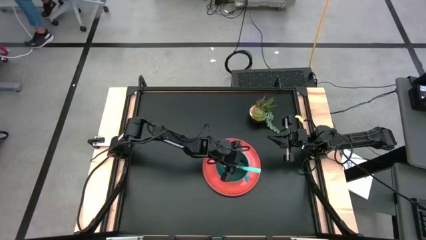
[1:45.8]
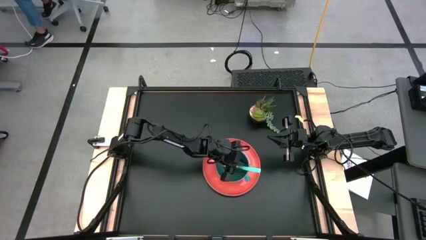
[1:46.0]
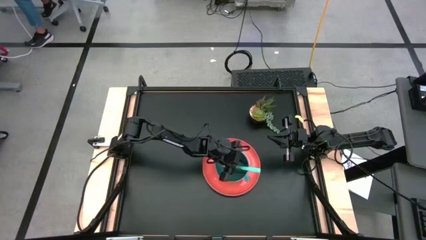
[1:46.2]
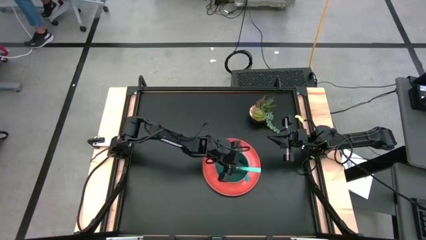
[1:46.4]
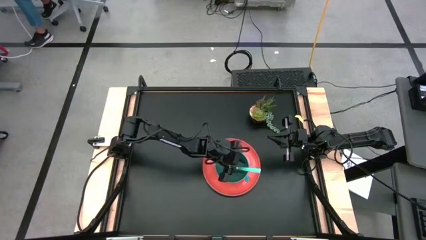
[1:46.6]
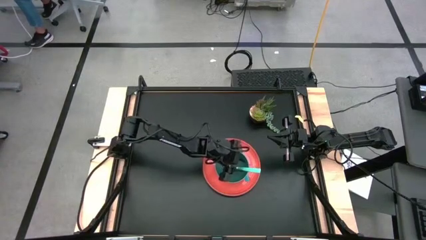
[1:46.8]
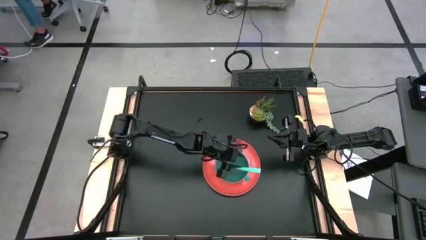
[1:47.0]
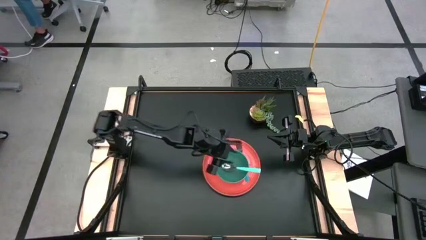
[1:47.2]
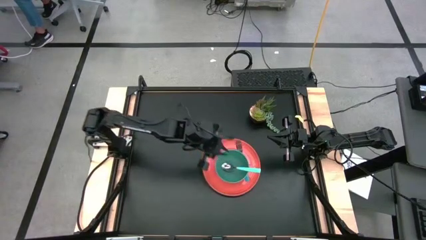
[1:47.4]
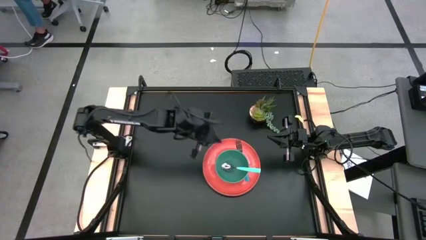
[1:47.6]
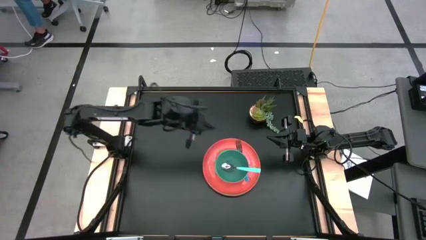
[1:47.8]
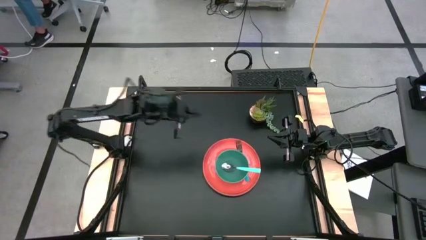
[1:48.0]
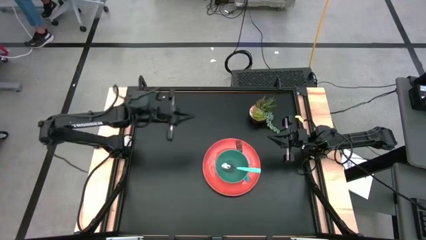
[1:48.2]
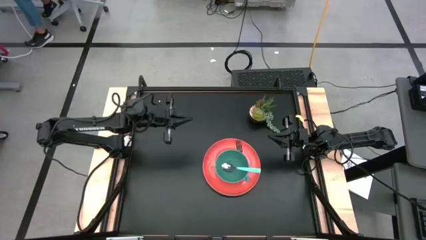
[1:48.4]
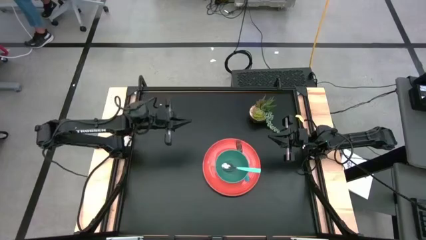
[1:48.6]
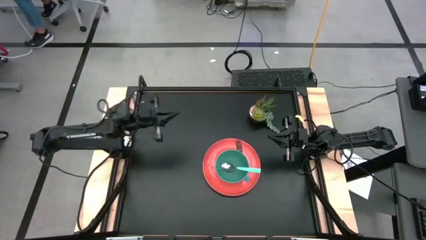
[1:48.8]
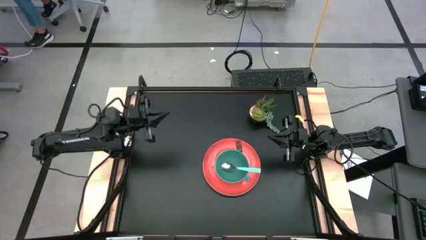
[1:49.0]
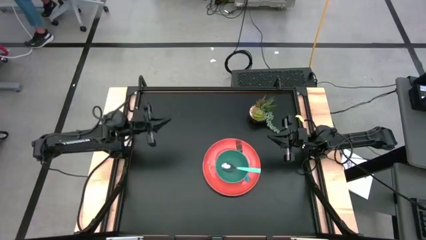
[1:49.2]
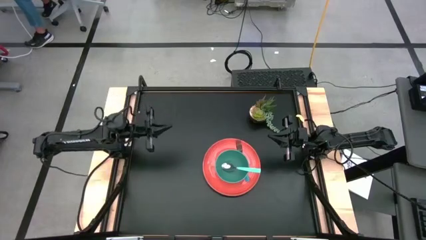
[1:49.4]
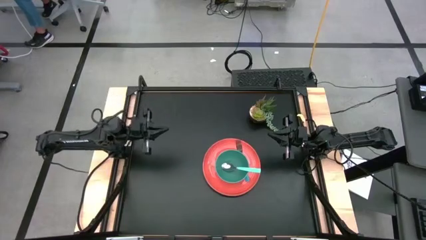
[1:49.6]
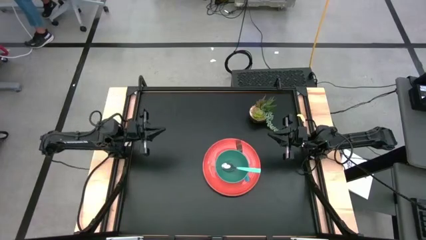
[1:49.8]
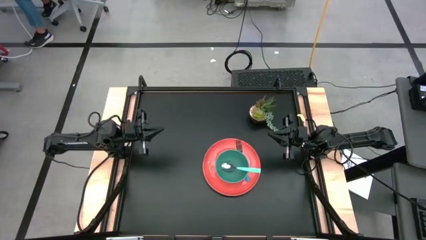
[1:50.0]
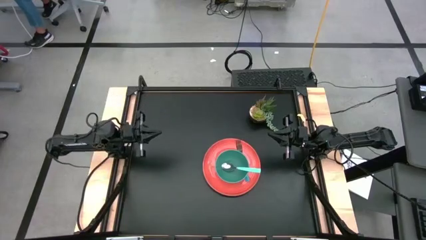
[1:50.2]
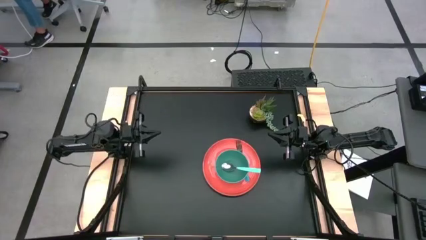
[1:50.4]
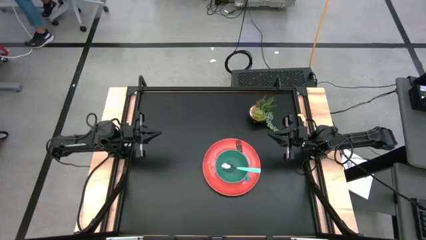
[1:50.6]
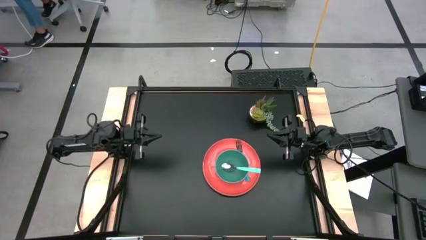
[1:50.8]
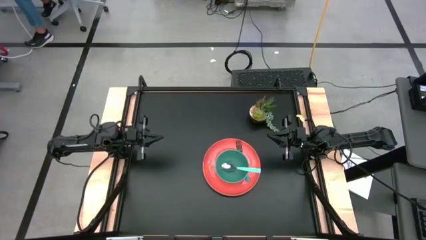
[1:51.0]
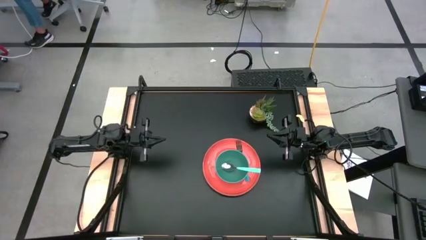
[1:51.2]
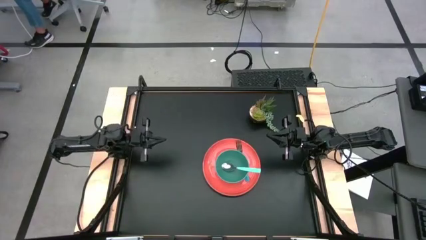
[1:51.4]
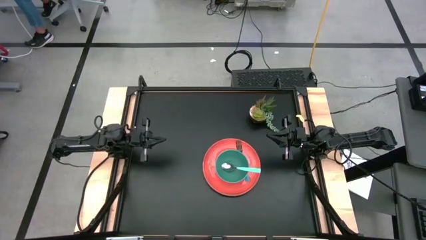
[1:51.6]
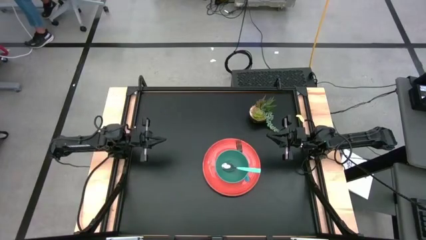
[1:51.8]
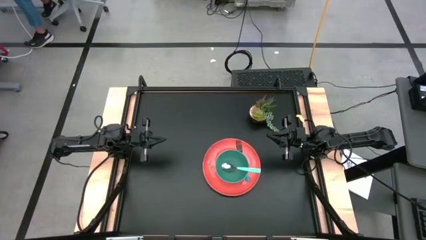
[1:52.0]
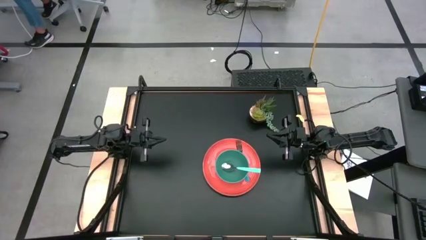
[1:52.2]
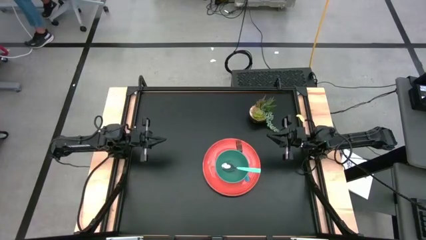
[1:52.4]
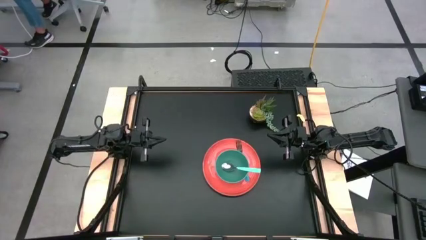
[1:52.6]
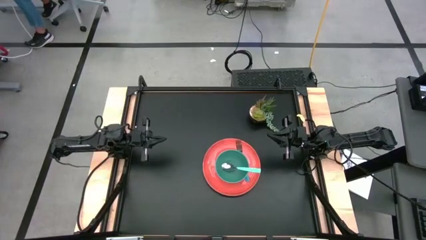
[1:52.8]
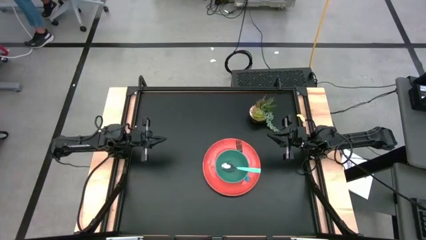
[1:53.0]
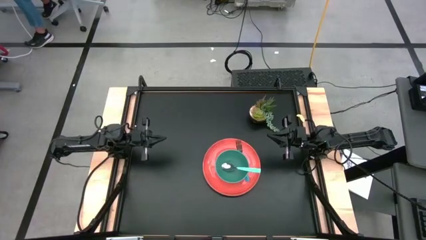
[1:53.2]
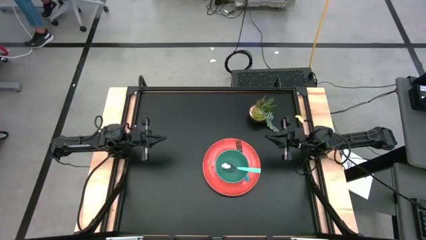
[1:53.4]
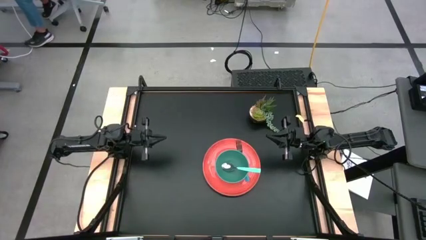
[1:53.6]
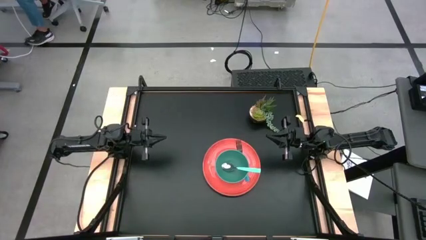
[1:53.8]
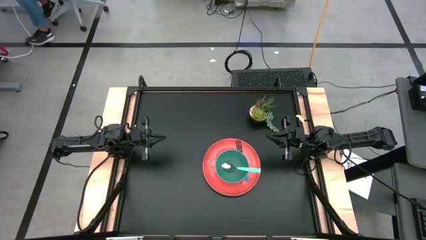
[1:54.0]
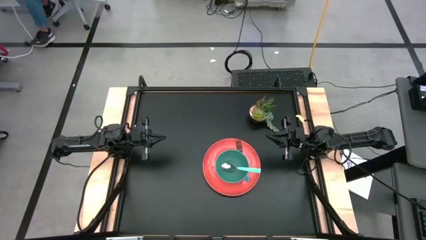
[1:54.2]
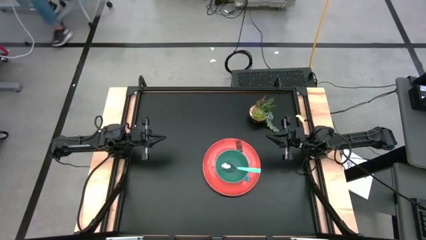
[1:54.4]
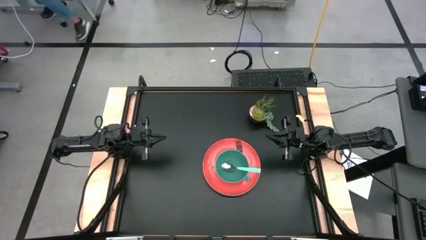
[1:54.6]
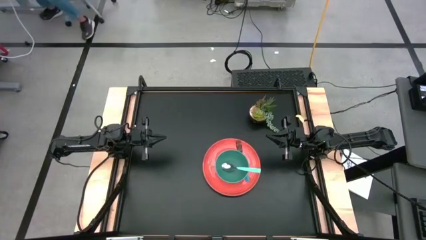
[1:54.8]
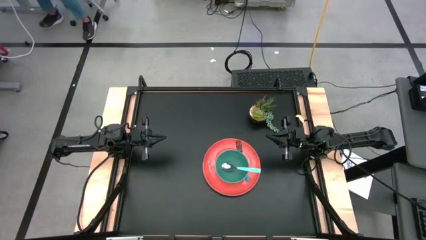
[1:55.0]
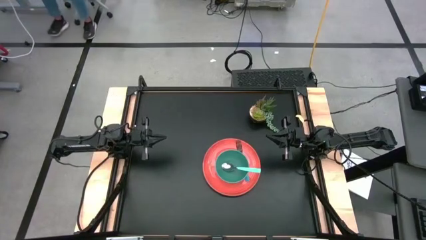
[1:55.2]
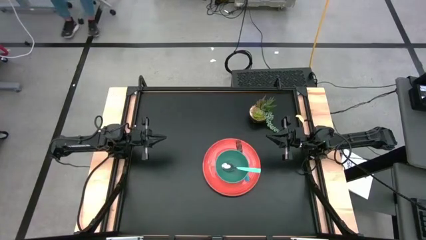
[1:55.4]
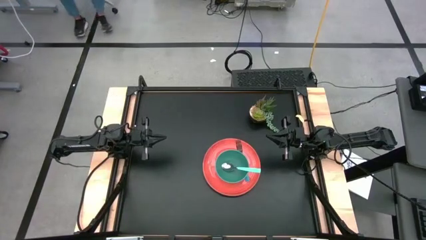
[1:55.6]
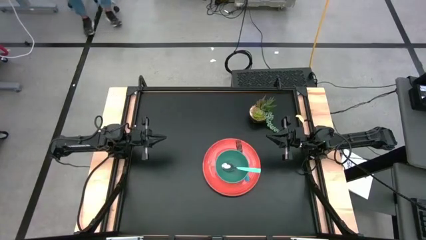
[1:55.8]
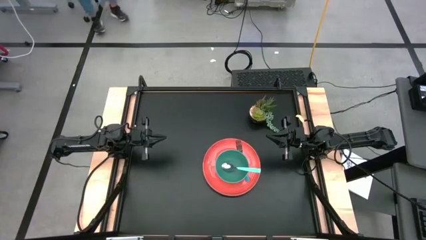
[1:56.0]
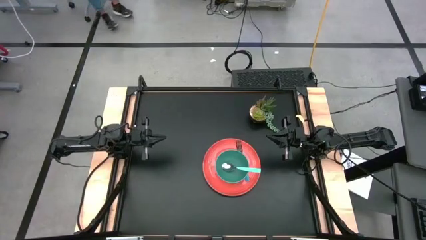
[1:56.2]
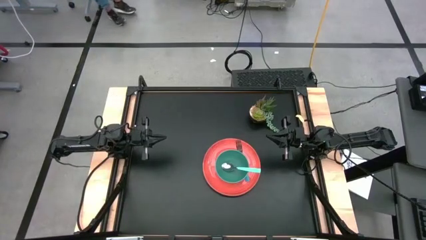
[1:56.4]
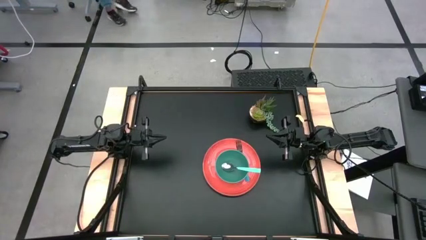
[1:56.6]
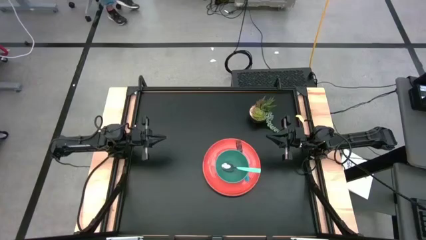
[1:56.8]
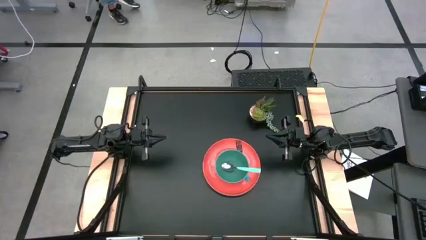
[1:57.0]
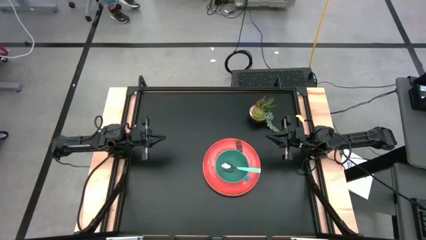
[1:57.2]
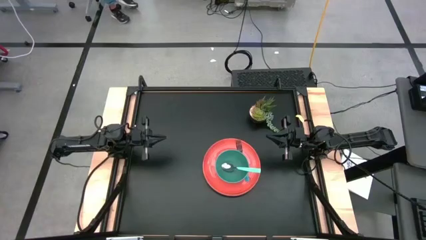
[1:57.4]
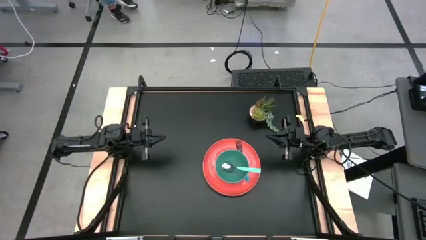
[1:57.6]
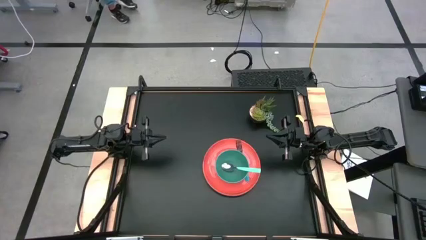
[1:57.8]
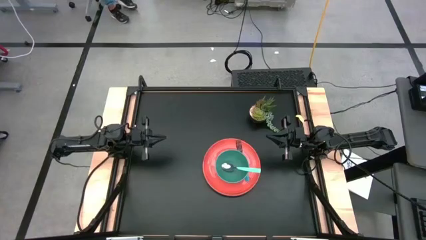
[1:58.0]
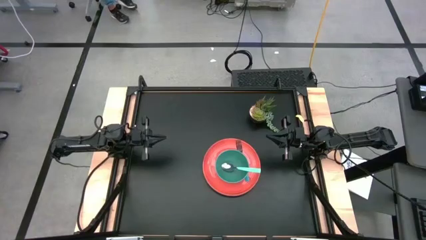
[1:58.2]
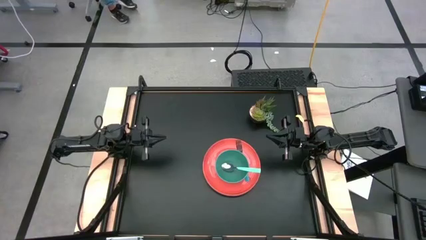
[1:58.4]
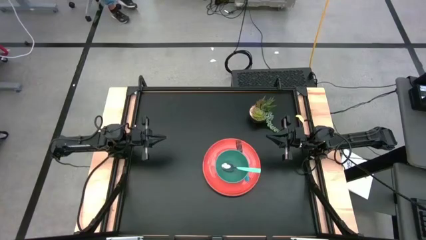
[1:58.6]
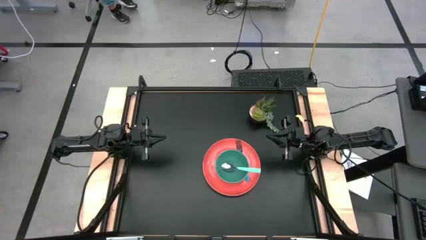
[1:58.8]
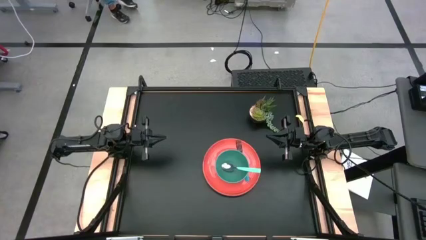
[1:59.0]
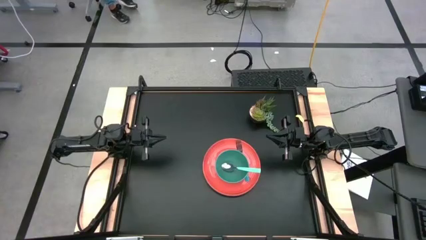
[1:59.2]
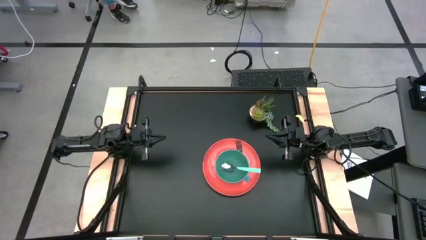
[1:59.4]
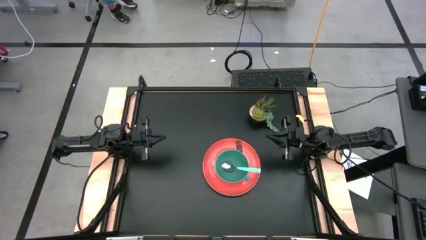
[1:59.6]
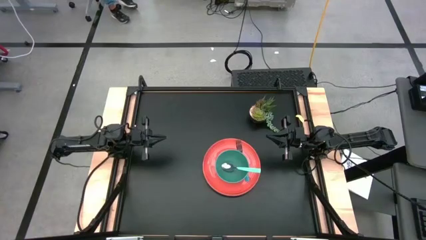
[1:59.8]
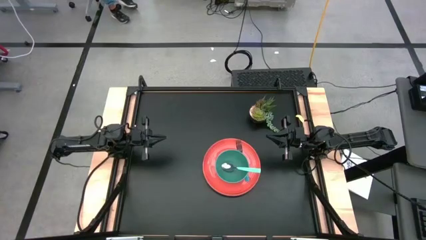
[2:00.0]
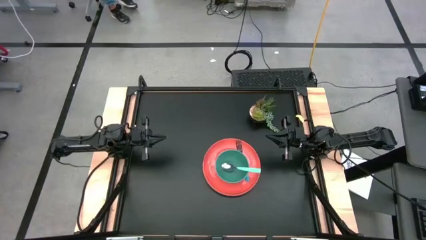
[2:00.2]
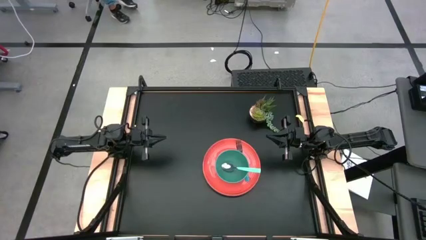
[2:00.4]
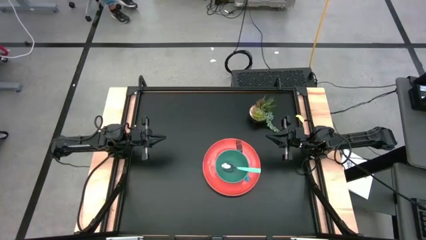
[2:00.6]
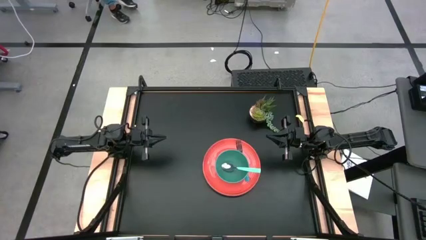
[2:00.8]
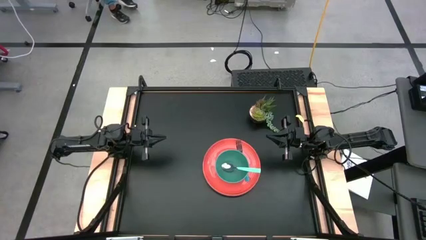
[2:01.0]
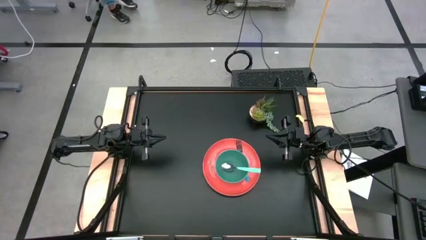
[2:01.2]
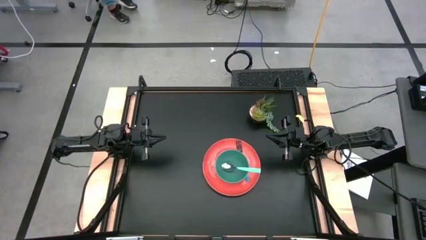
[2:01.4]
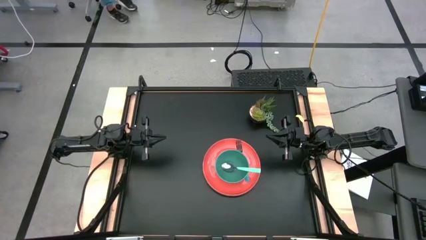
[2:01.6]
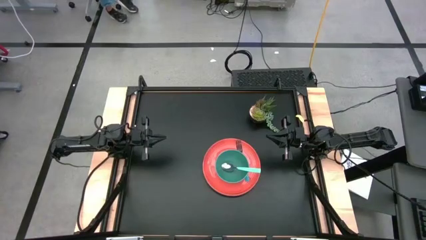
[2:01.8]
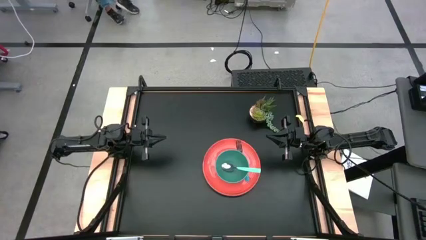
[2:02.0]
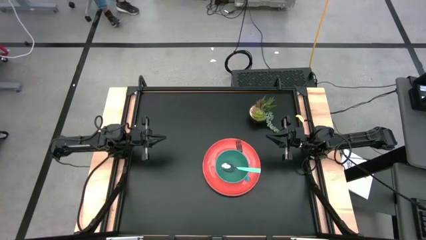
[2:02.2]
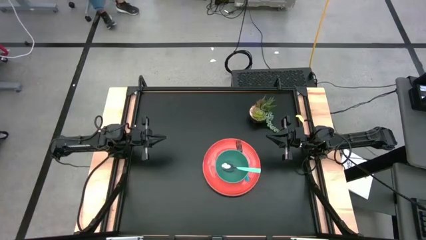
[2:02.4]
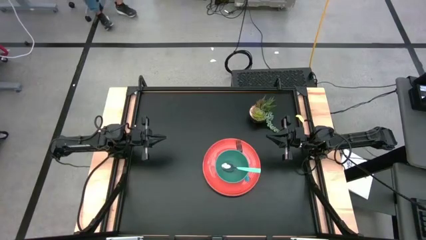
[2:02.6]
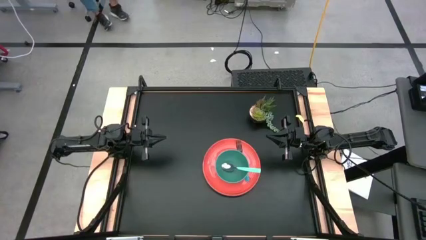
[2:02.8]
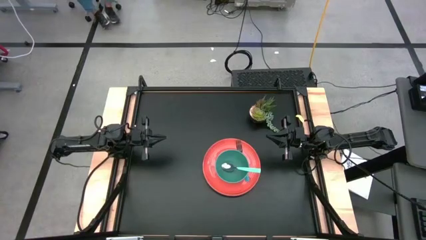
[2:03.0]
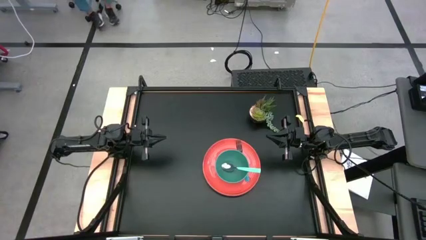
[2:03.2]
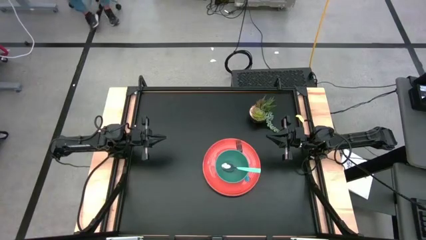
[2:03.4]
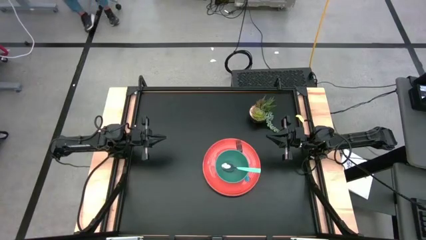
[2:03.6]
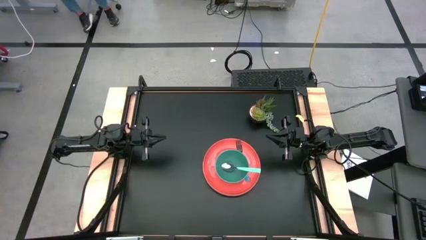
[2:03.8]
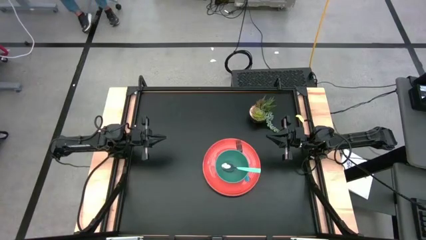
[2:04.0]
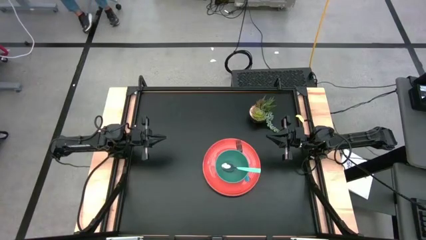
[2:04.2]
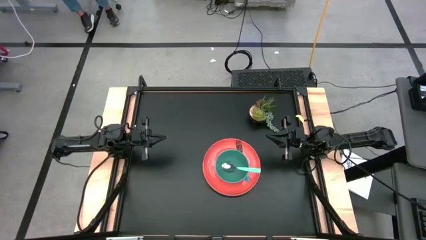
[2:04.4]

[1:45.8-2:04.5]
Task: Set table place
Return to Home Position
